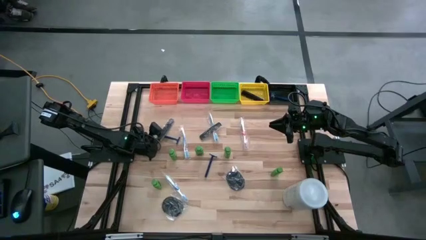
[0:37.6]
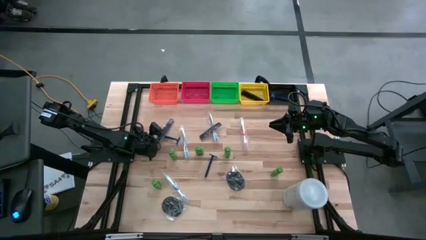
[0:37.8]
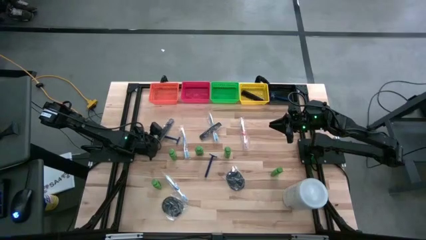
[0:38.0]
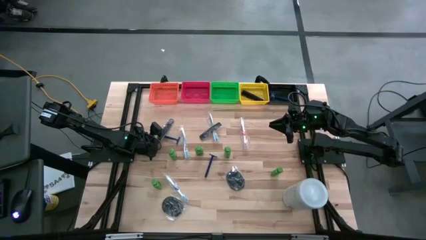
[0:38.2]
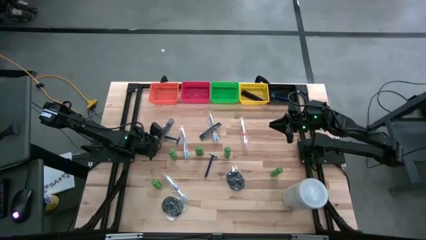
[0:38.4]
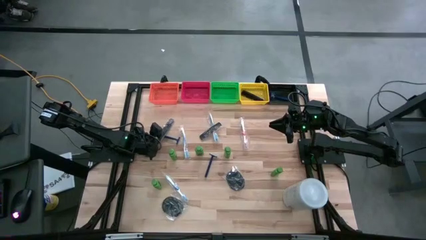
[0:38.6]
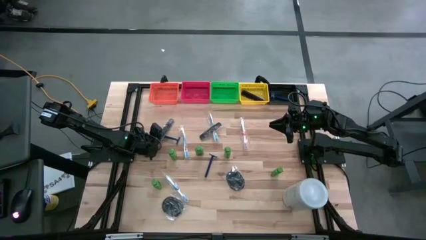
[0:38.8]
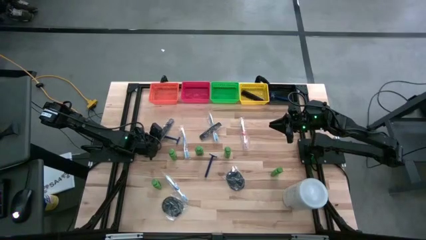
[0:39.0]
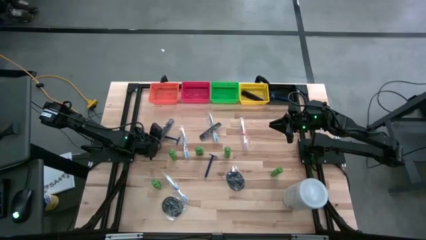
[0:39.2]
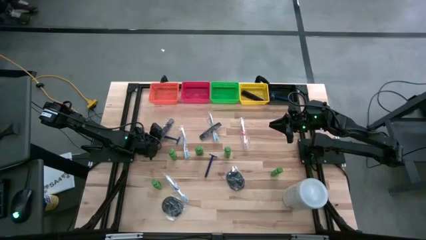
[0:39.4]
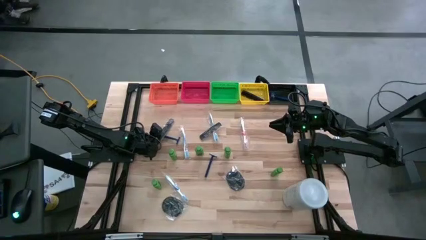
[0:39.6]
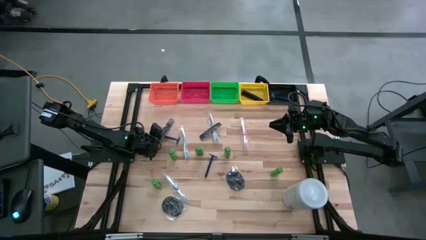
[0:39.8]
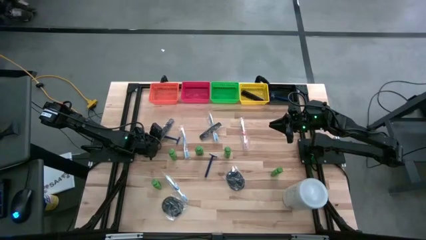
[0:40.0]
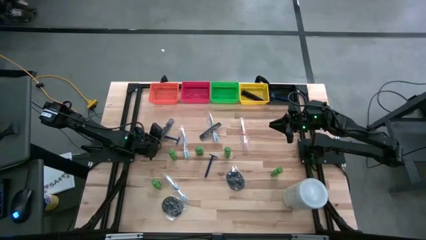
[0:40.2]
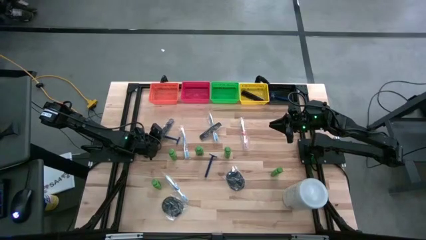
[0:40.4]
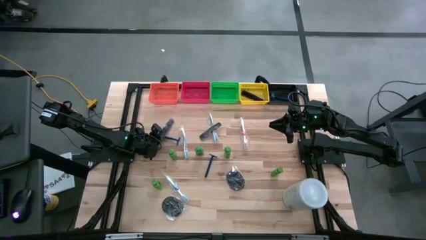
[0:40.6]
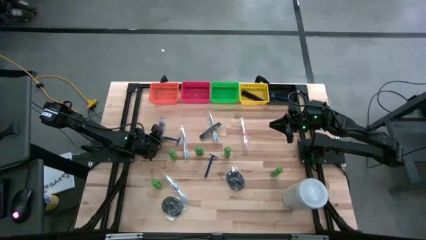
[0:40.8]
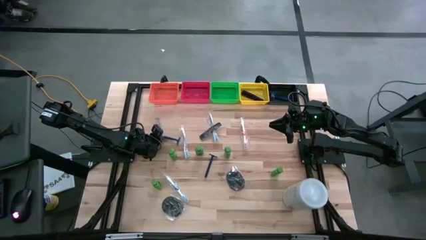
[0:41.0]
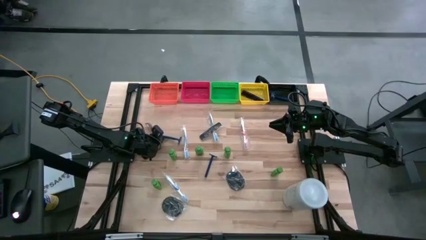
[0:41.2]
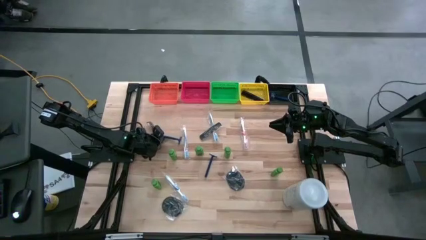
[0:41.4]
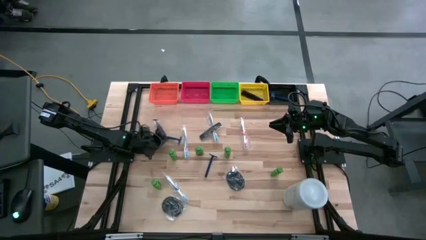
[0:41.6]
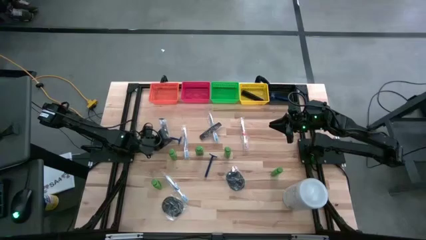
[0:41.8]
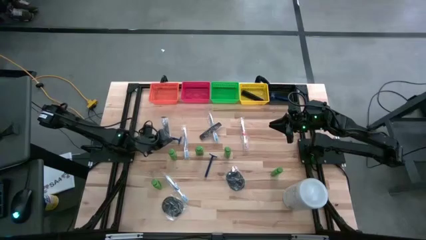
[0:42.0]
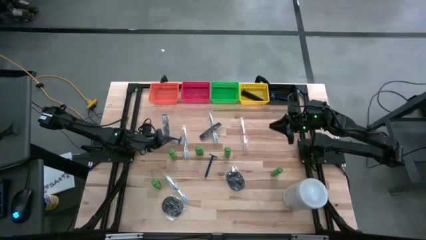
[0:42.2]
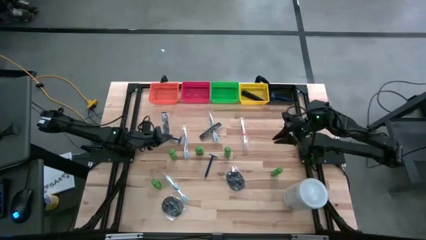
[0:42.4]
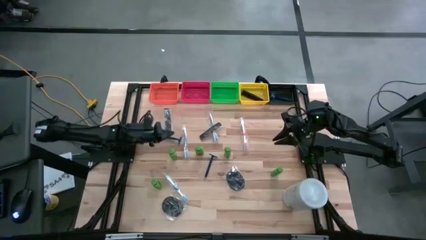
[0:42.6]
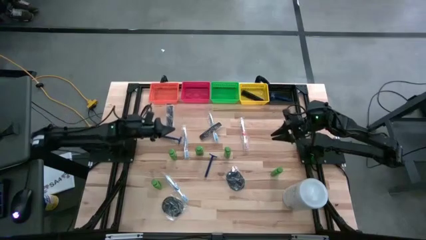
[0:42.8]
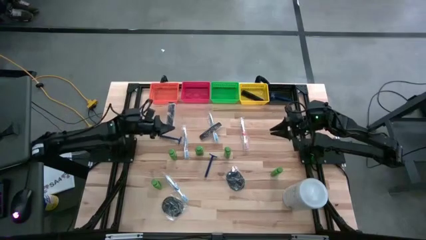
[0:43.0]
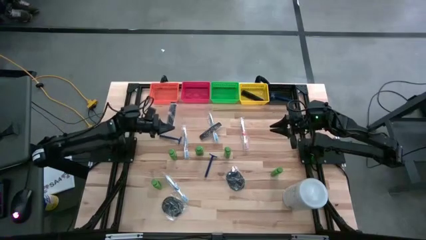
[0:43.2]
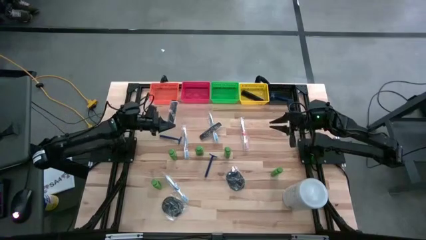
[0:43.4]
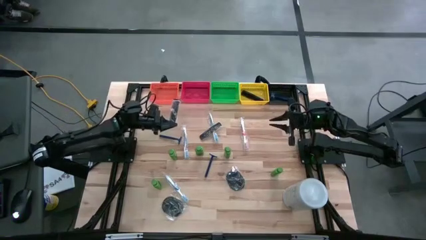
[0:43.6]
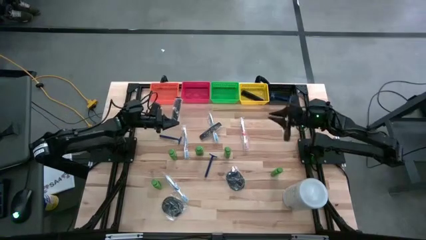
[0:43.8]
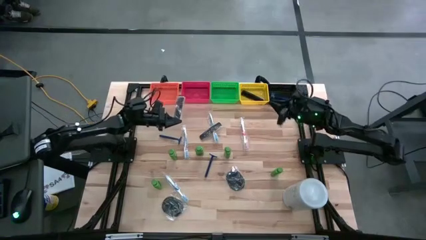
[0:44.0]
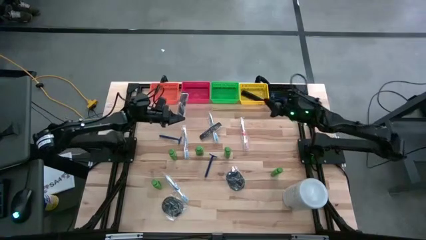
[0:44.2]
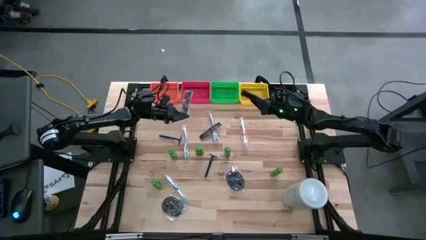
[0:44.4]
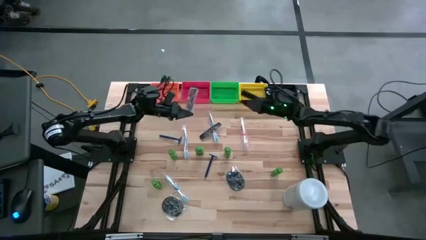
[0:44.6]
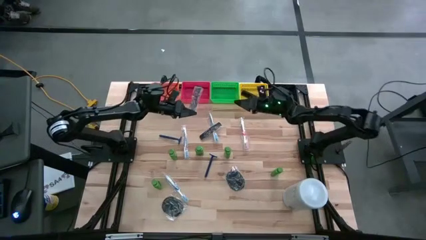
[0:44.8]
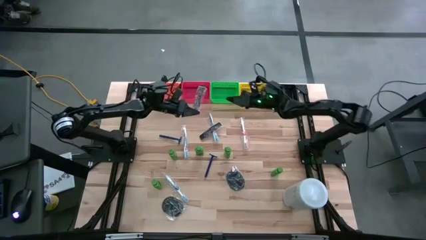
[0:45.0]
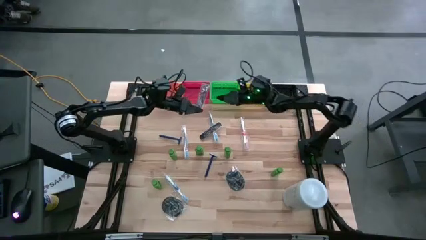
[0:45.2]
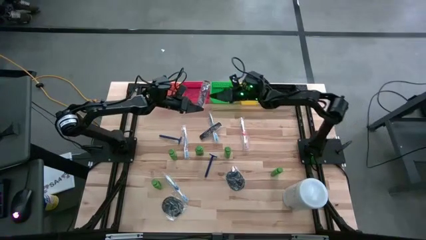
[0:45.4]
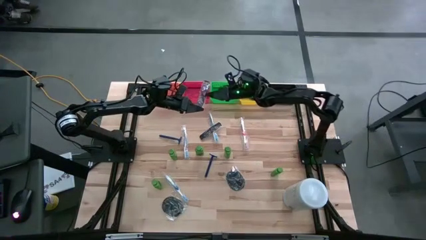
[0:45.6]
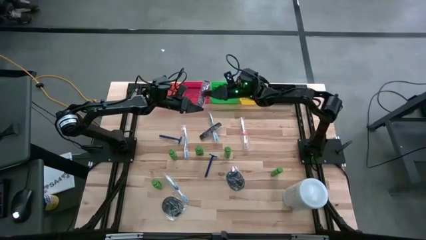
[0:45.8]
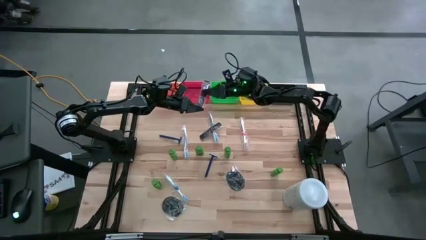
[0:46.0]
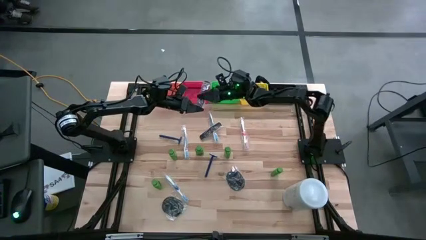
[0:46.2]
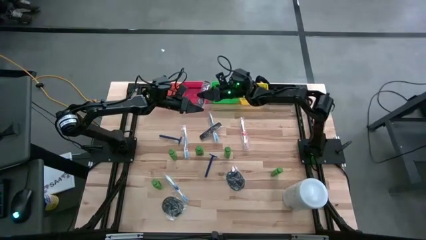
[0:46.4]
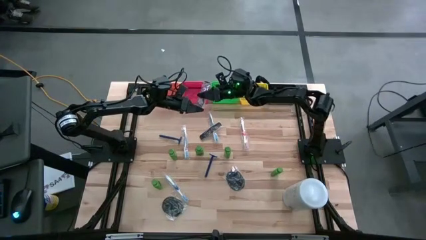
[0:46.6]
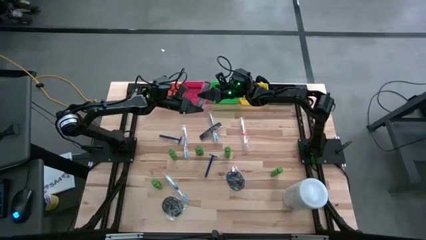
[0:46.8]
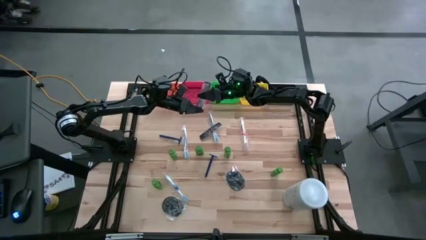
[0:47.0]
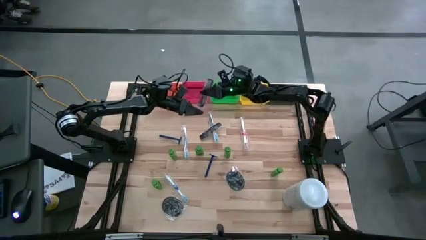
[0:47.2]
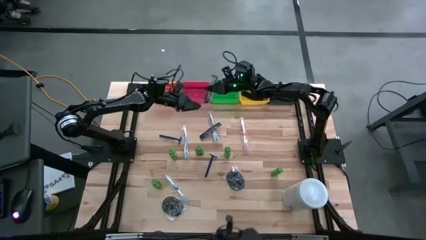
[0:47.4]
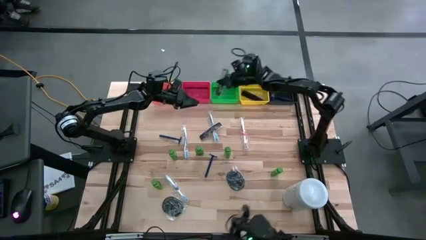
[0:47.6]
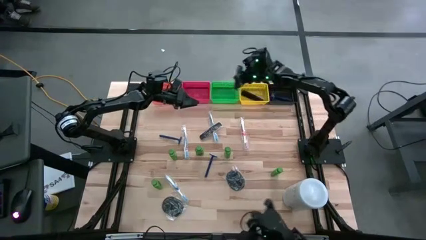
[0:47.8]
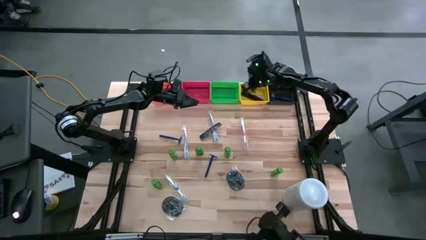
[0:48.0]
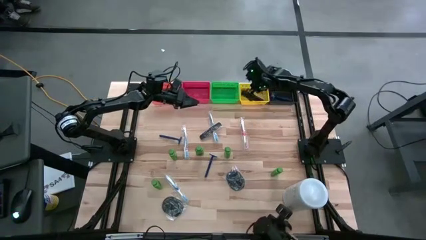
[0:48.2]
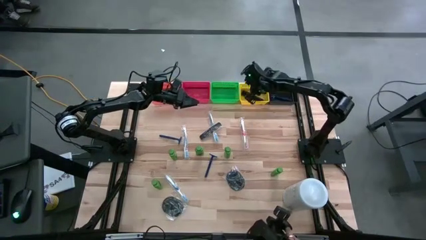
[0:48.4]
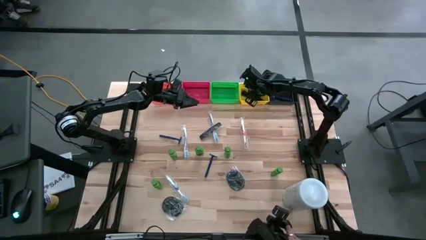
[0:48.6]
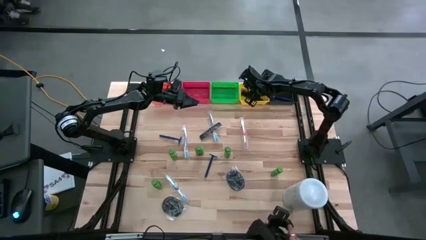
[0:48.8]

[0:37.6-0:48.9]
Task: Pick & Place Travel size toiletries
Put the black hair comb into the yellow bin

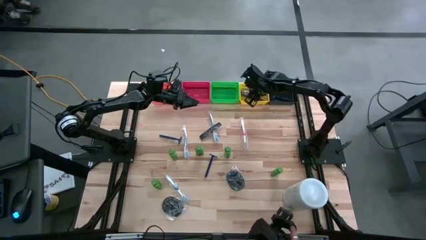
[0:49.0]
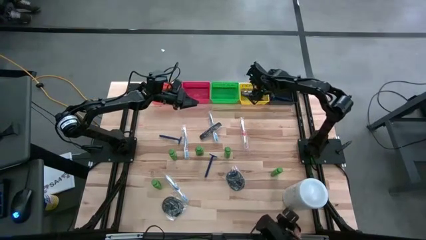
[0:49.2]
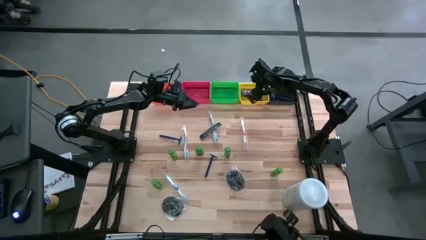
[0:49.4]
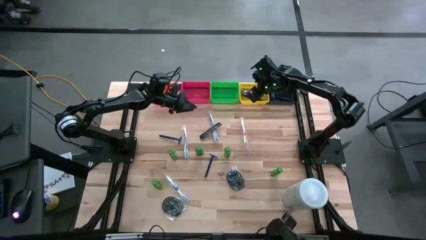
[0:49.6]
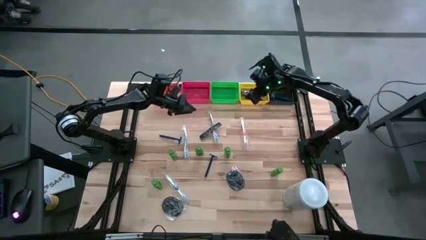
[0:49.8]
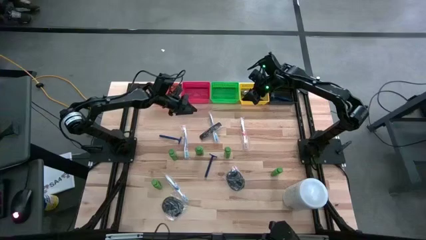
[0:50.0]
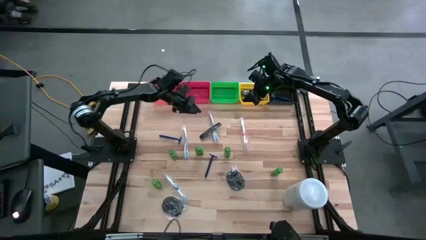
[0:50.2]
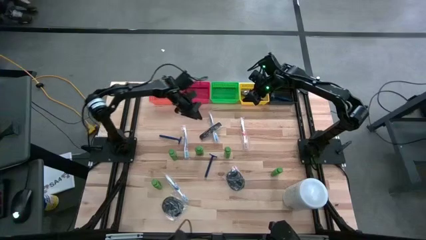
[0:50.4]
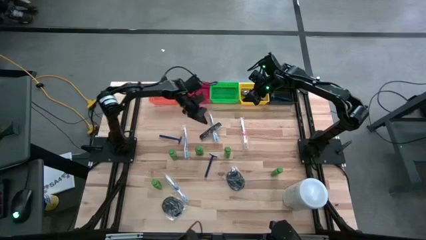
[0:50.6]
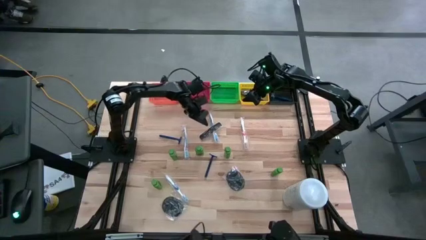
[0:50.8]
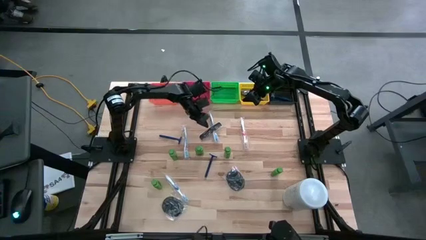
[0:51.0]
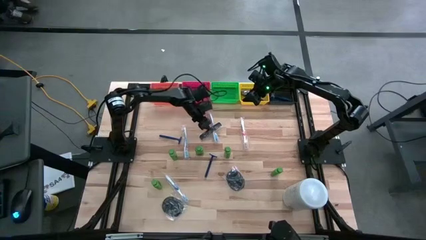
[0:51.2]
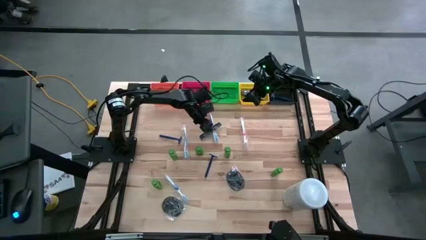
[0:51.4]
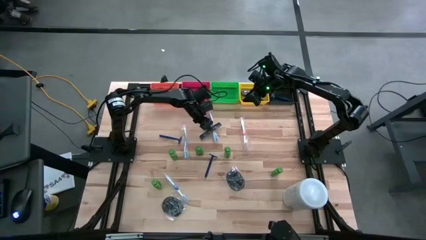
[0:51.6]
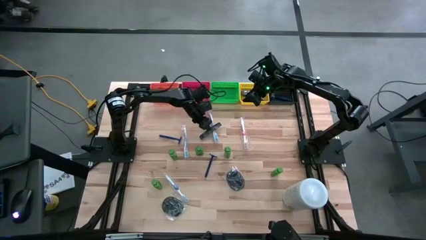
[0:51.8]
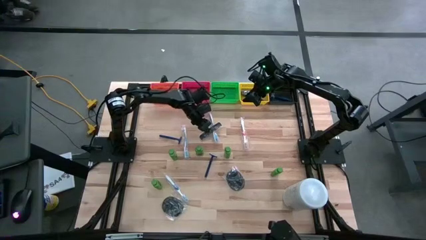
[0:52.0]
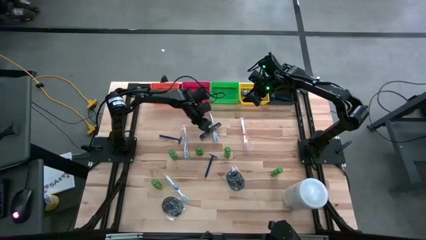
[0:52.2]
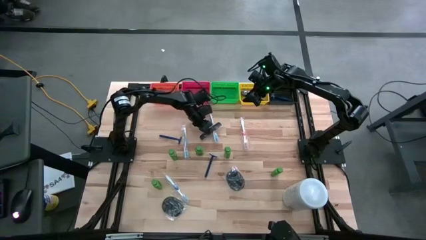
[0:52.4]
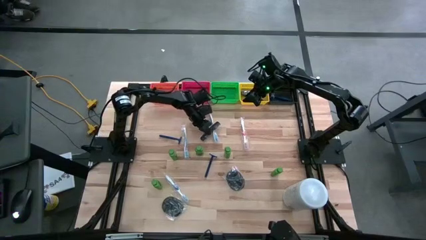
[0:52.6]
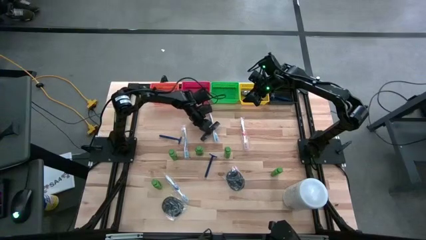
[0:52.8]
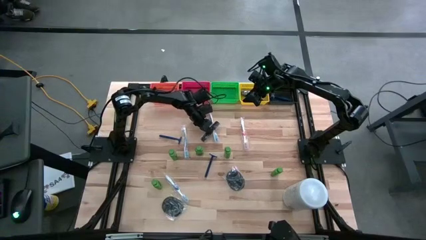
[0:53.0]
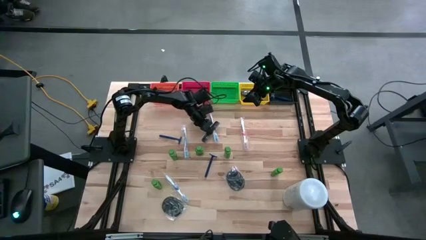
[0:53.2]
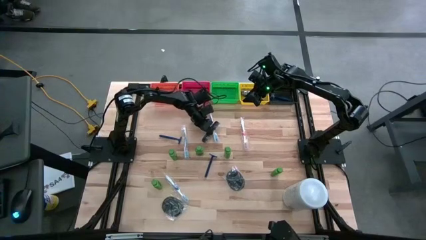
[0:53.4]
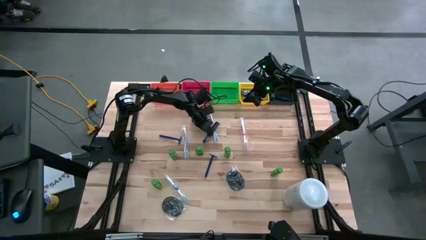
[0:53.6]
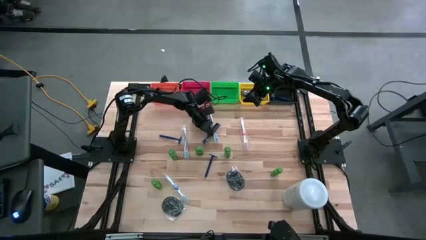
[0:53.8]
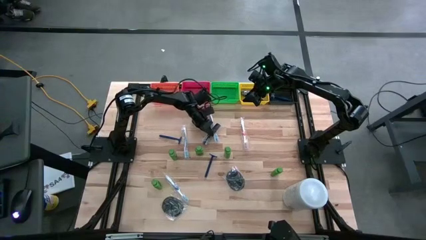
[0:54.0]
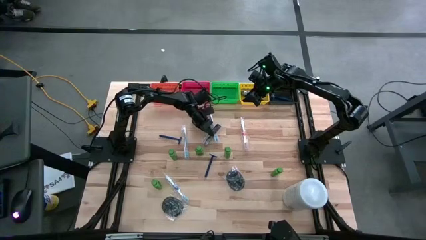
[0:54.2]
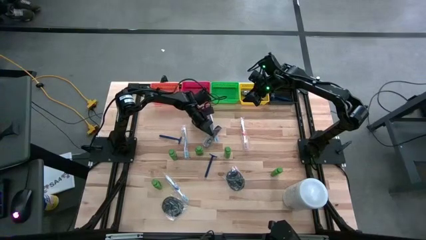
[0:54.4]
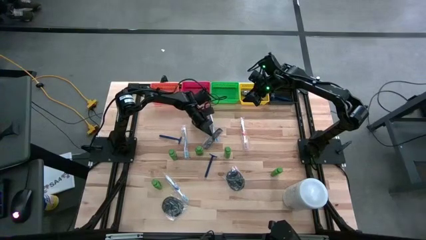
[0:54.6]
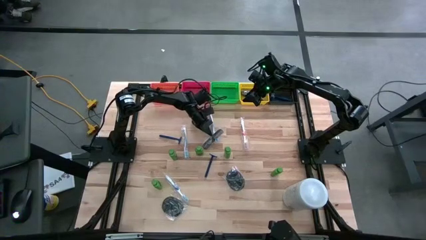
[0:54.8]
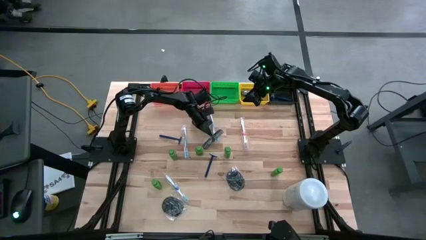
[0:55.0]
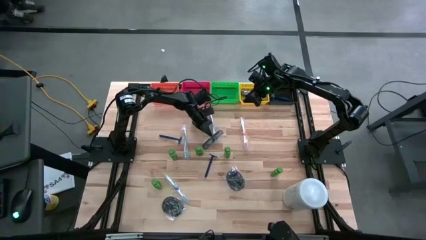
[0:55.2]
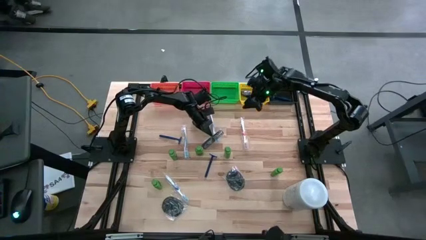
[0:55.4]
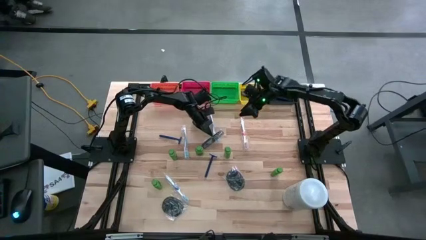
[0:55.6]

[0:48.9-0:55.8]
Put the black hair comb into the yellow bin
